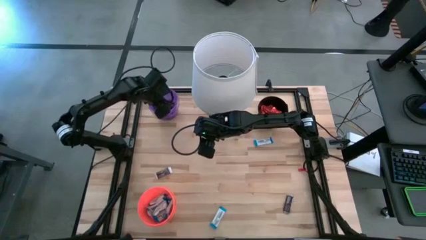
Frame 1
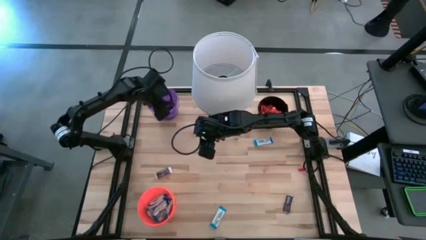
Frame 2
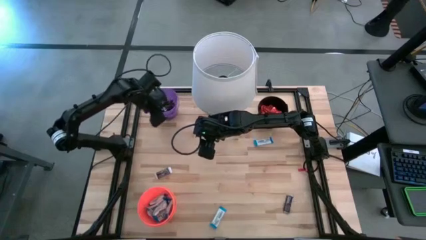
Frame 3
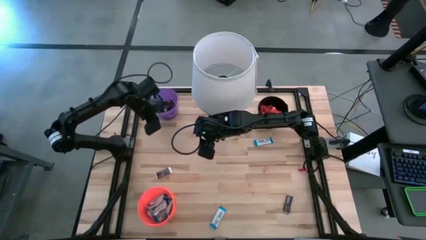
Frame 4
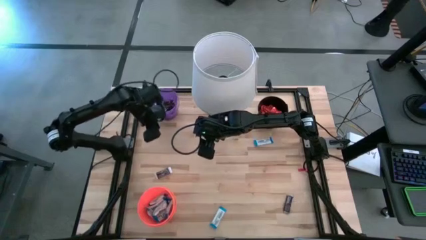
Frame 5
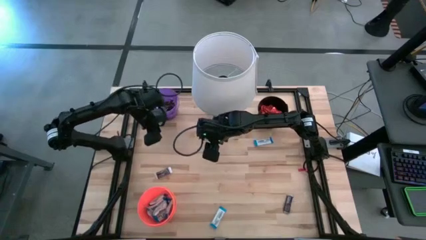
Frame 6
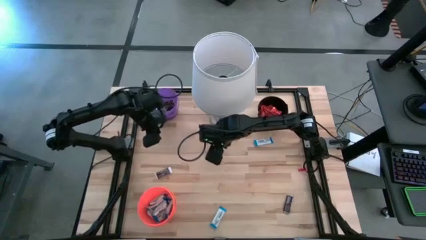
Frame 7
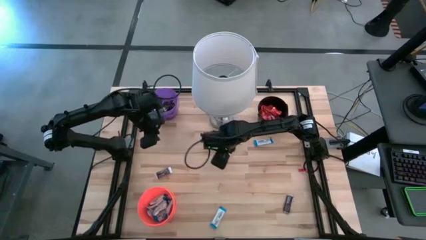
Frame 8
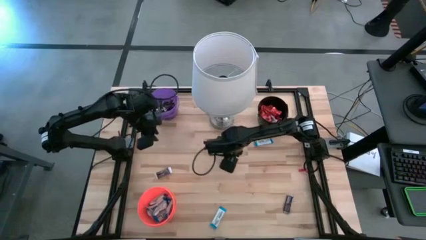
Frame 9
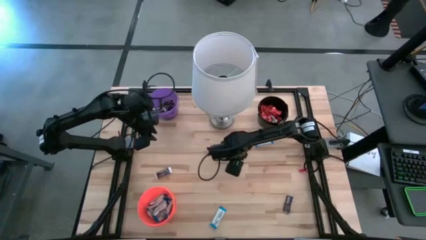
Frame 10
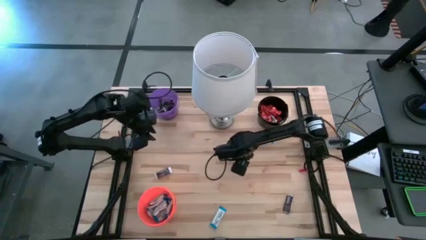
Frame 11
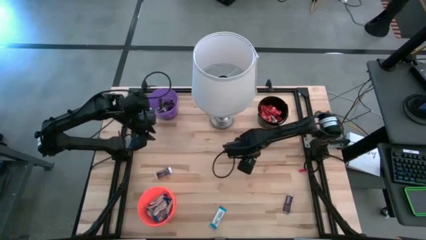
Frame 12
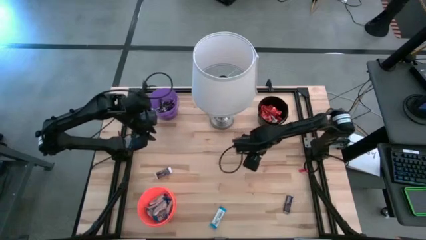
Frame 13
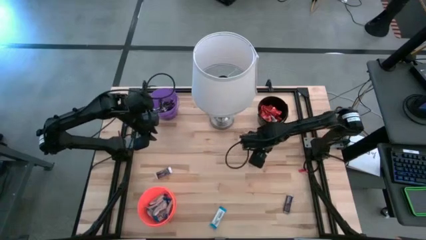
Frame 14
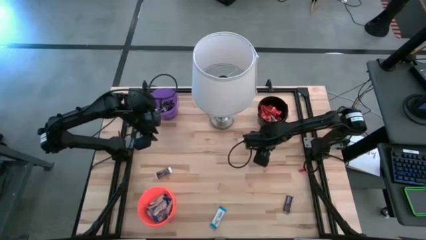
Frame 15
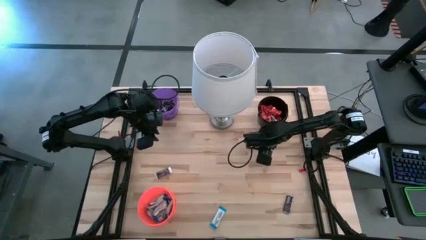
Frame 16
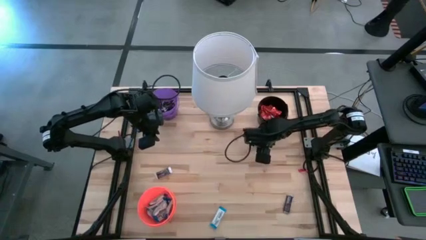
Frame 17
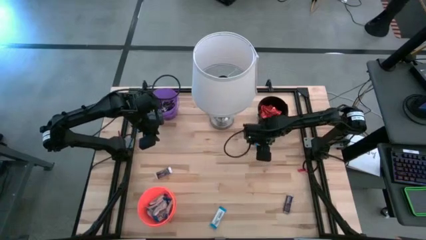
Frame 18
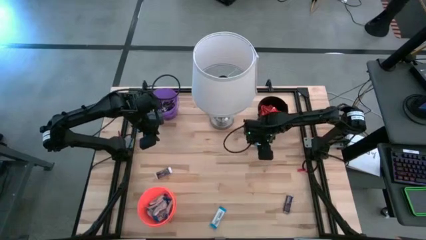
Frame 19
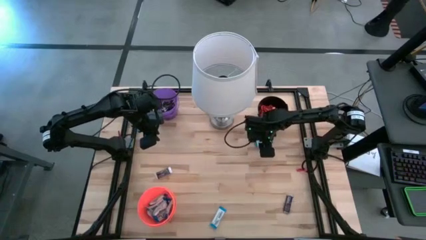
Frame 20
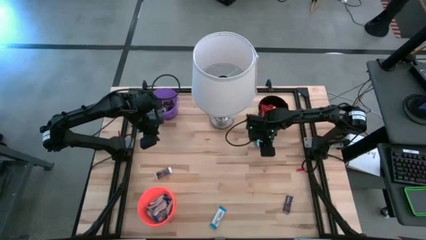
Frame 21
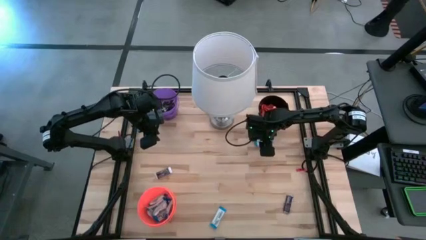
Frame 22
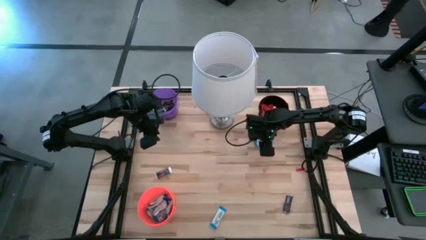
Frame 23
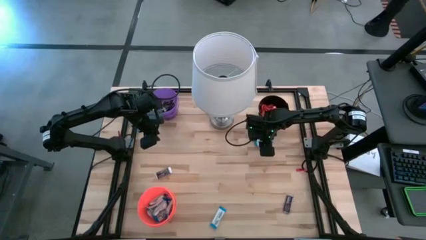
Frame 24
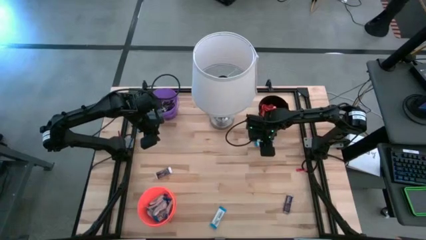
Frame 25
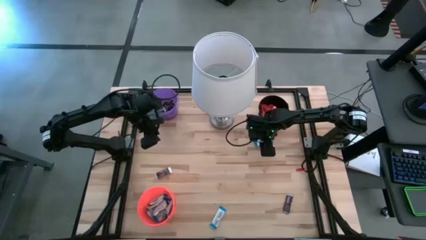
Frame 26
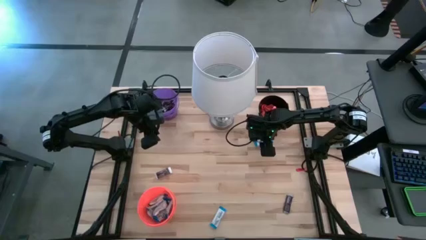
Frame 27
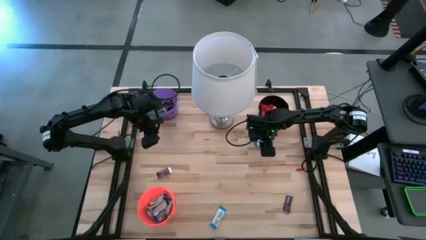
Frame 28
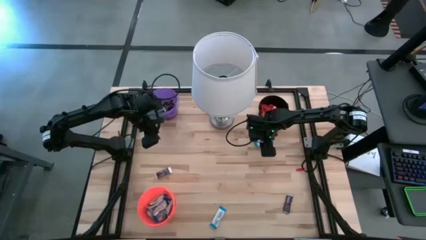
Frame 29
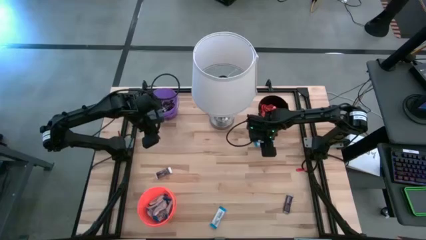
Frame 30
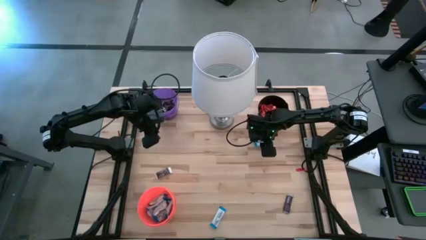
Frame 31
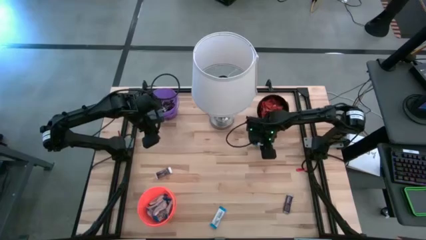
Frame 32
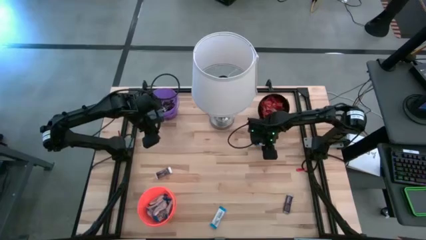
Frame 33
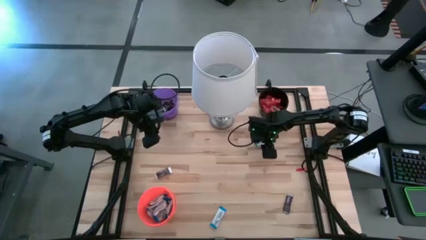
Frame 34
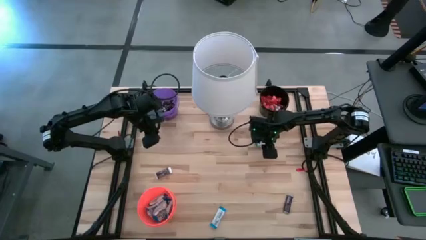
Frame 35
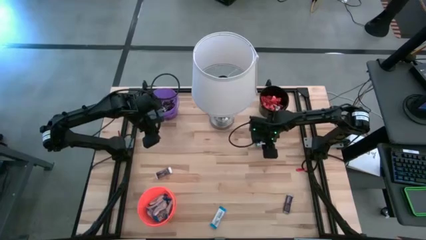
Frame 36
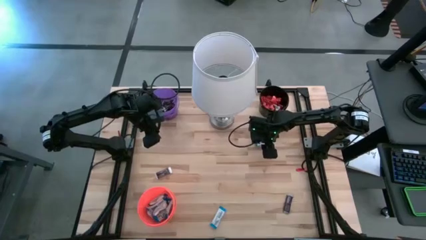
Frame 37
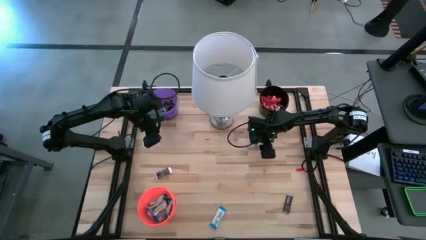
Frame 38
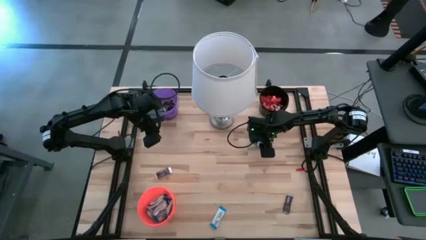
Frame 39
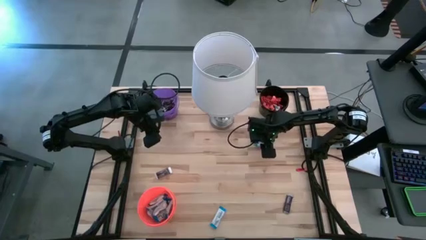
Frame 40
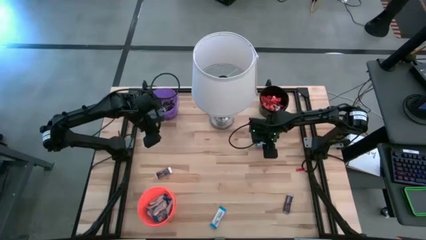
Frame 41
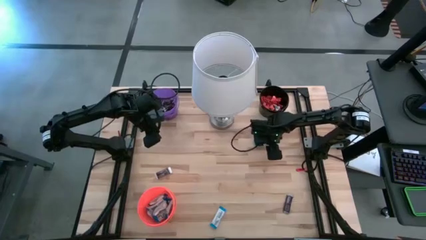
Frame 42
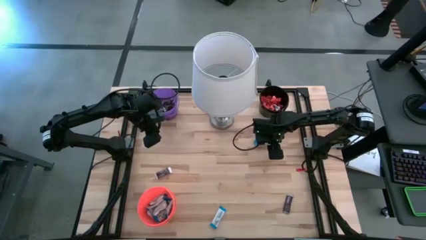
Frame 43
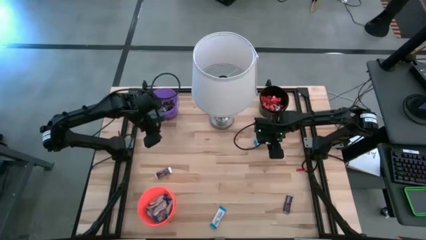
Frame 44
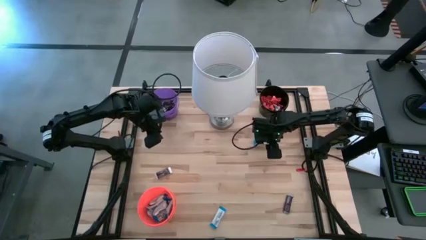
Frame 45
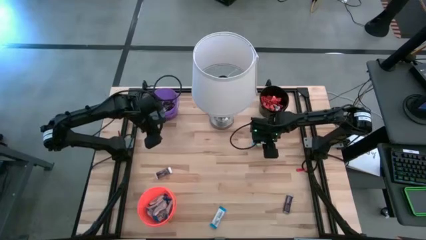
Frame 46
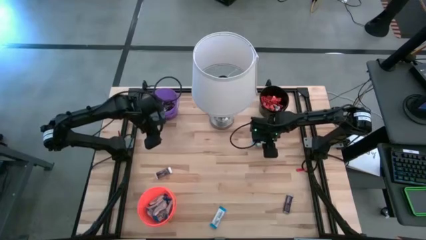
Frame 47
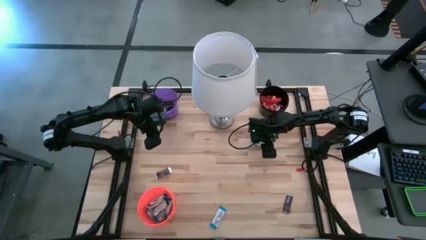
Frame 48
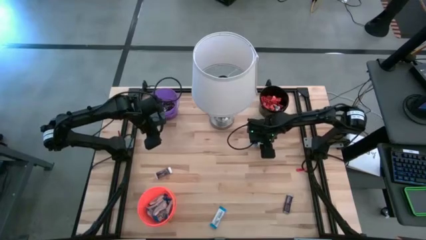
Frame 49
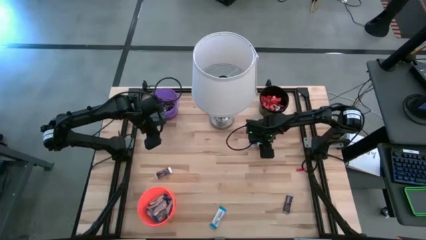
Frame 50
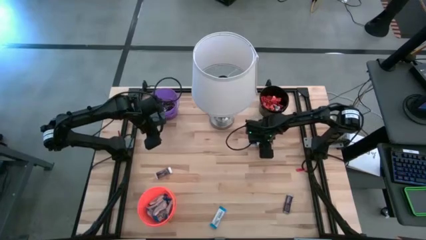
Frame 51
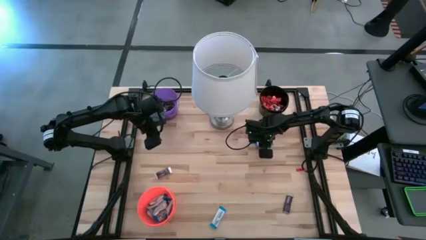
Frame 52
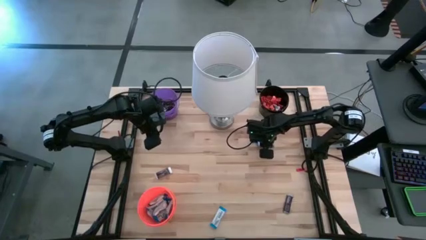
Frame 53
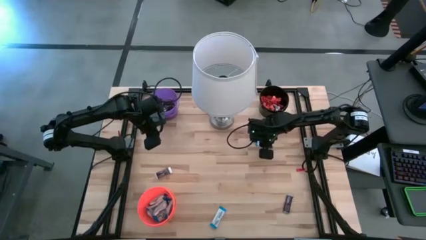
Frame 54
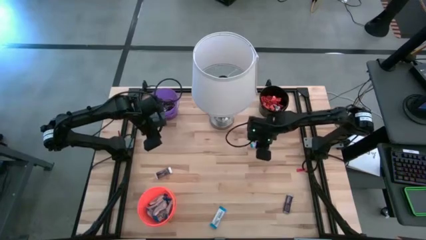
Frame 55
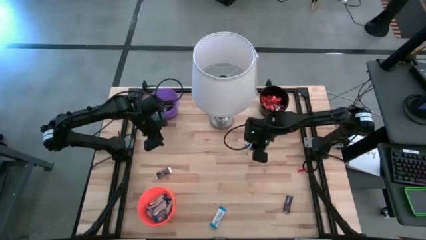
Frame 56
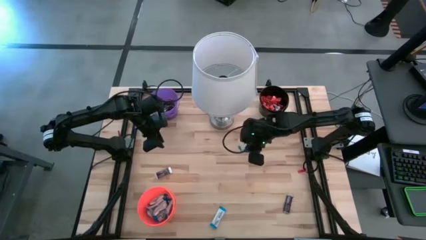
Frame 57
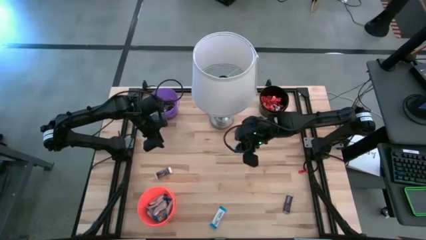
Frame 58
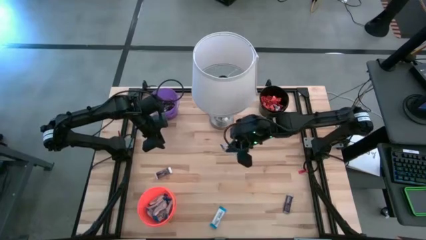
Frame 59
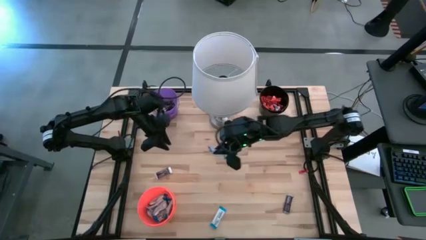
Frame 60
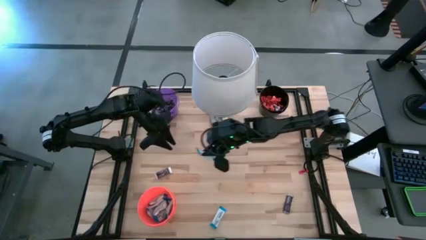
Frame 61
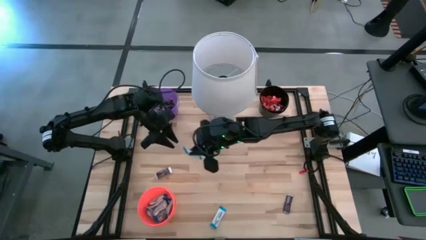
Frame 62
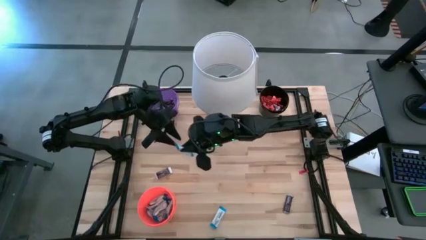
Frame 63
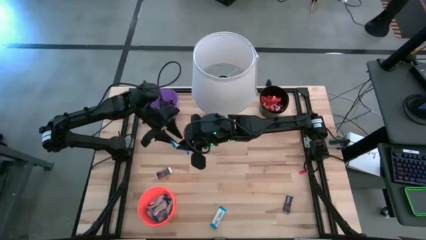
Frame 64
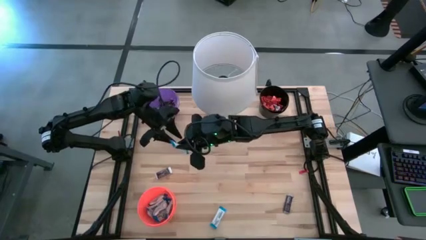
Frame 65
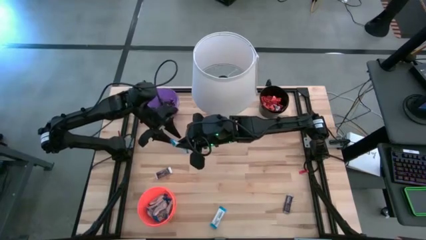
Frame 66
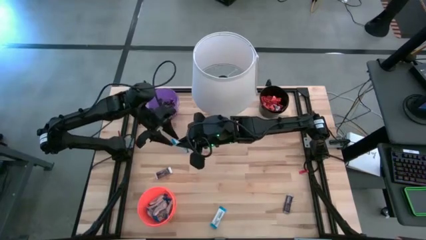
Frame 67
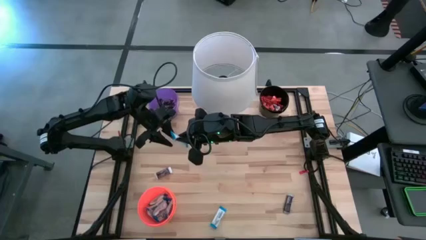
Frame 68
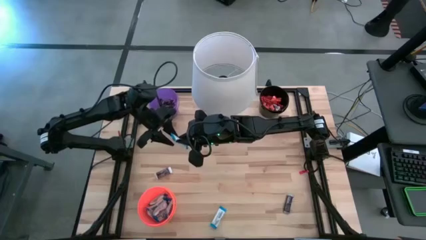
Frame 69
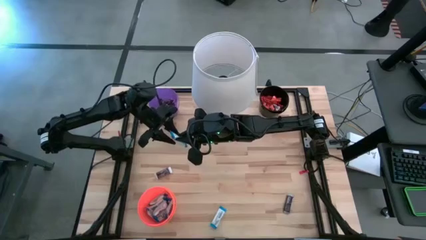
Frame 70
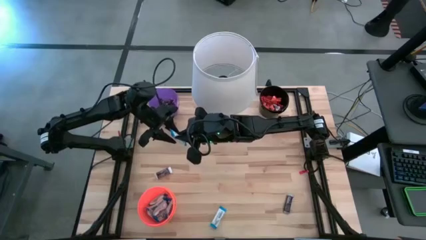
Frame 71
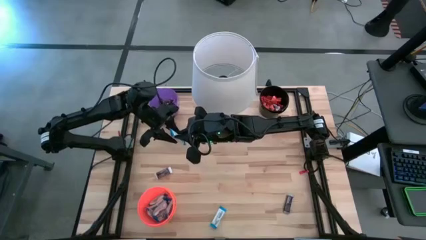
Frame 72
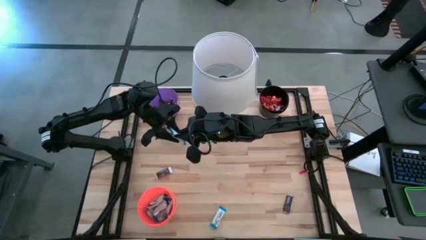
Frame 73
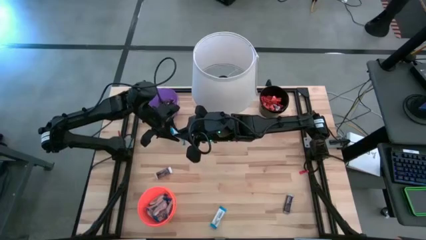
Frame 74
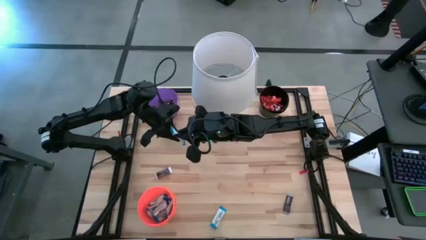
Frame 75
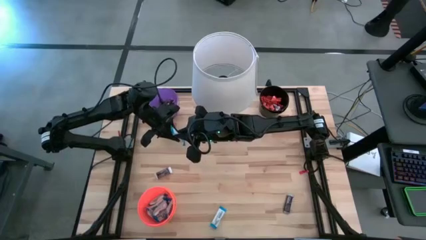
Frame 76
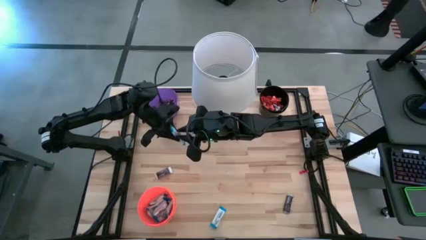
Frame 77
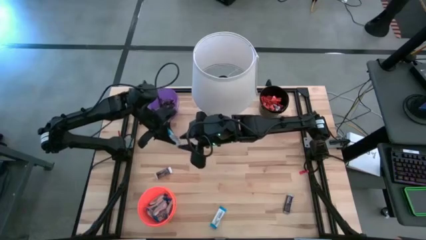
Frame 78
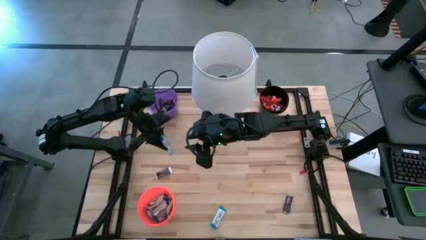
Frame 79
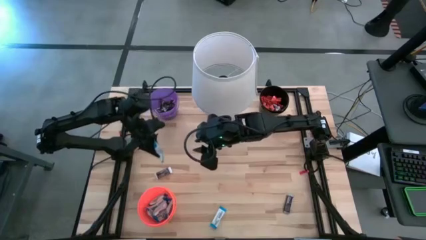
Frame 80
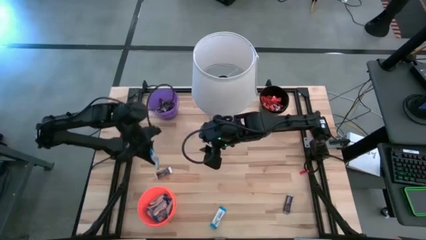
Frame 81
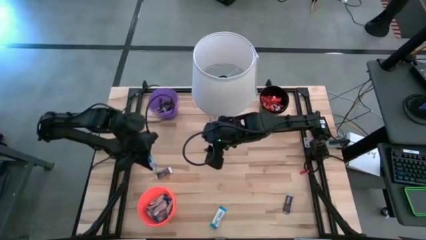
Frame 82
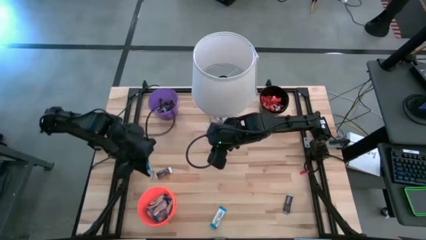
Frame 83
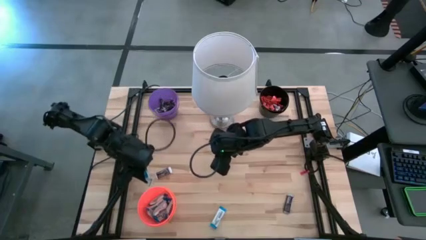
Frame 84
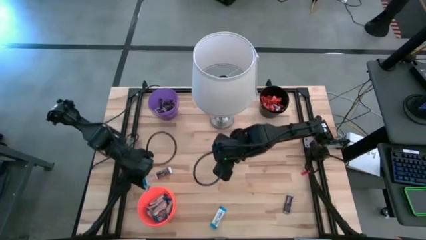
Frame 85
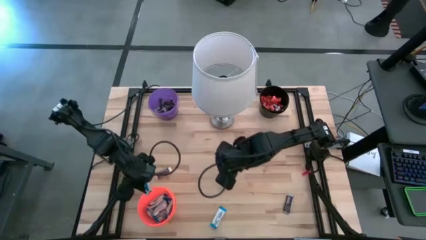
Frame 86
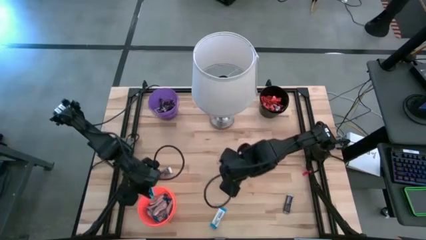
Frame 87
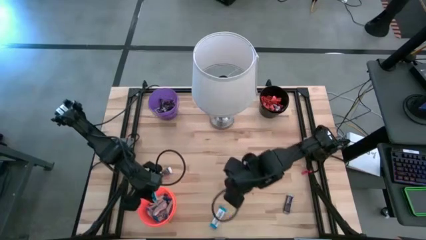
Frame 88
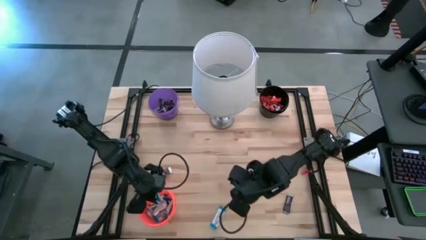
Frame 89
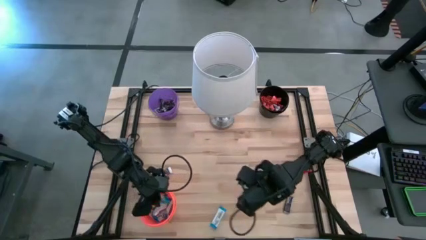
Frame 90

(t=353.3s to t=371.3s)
Task: Organize candy in baskets
Put the white chocolate bar into the orange bucket
